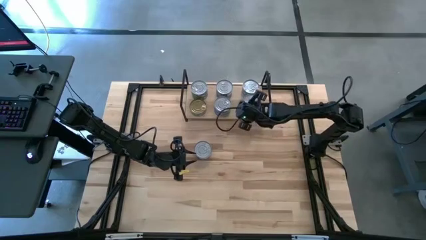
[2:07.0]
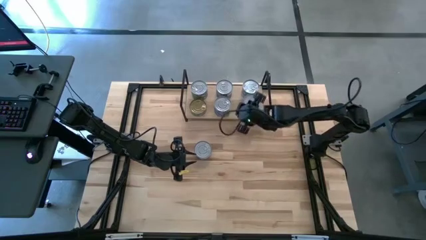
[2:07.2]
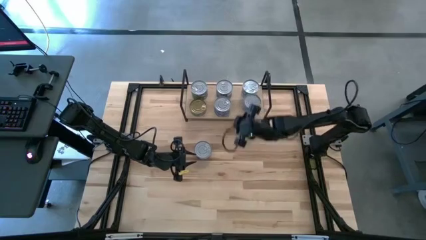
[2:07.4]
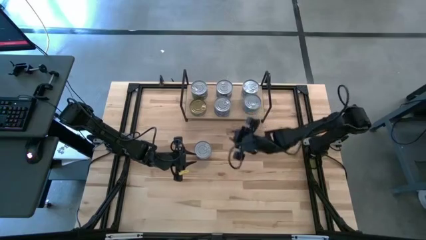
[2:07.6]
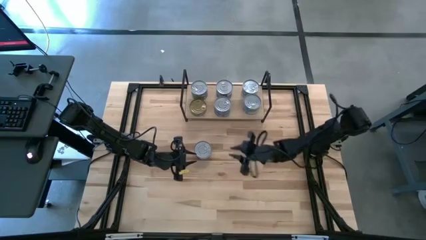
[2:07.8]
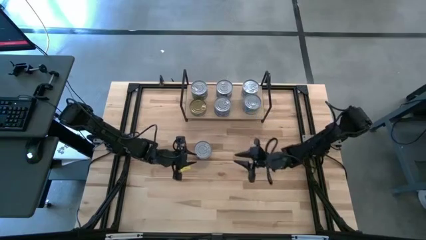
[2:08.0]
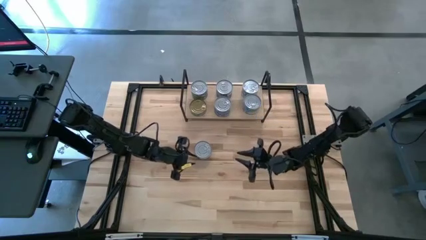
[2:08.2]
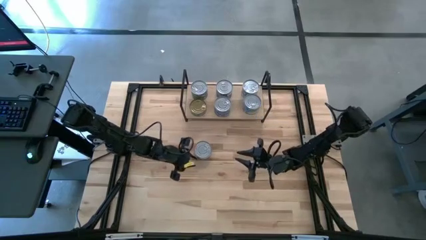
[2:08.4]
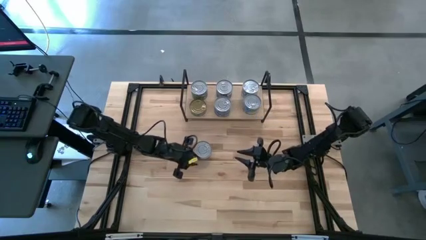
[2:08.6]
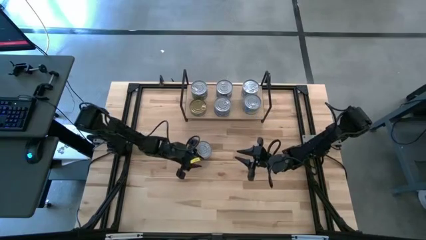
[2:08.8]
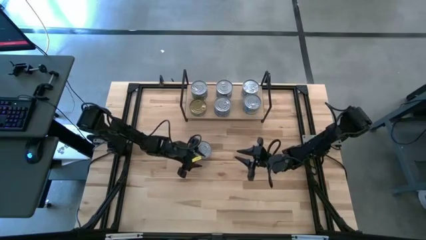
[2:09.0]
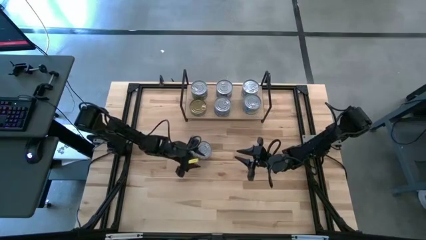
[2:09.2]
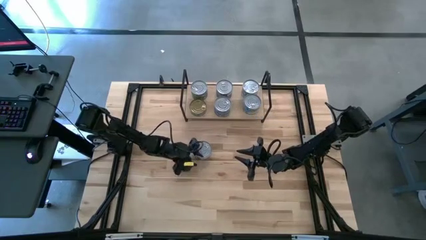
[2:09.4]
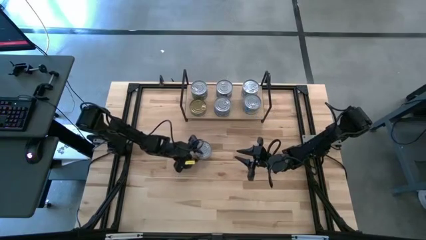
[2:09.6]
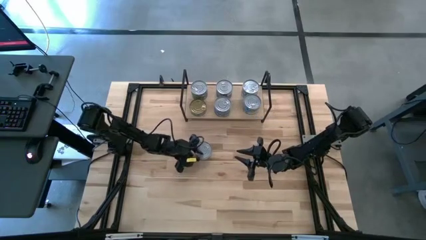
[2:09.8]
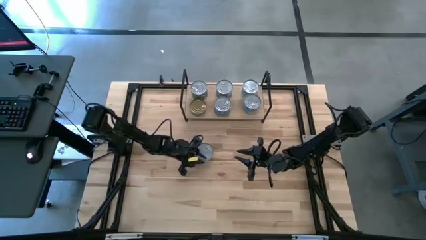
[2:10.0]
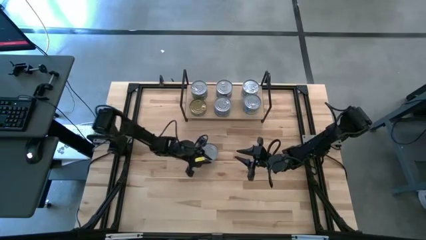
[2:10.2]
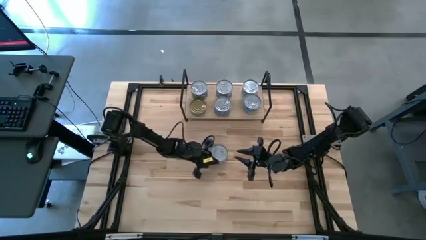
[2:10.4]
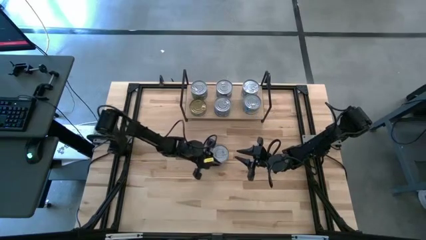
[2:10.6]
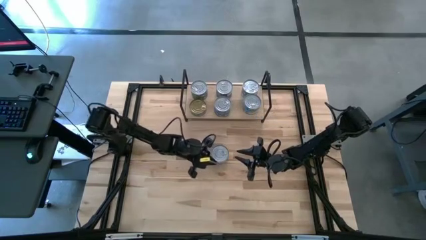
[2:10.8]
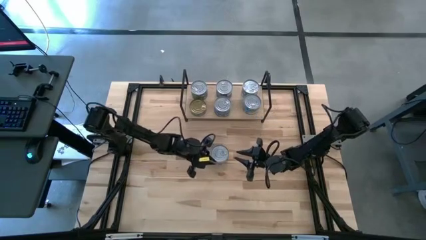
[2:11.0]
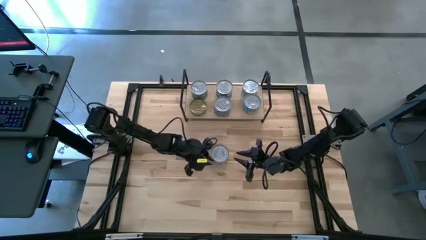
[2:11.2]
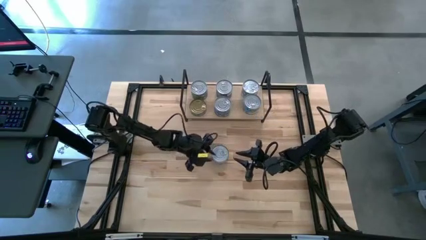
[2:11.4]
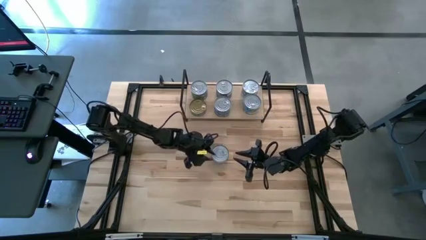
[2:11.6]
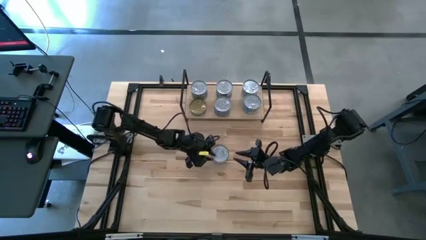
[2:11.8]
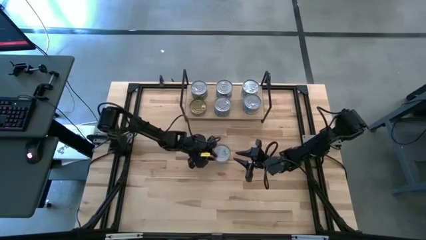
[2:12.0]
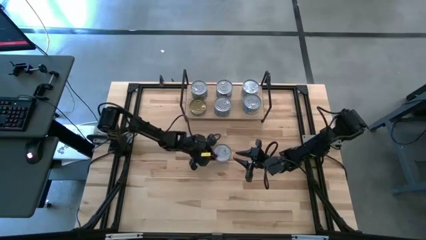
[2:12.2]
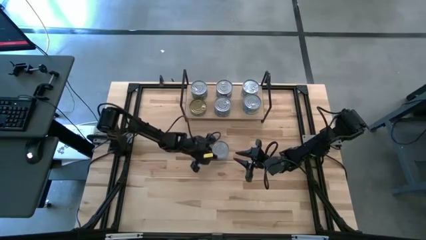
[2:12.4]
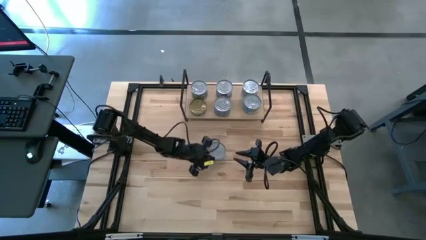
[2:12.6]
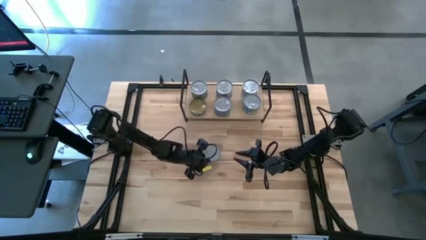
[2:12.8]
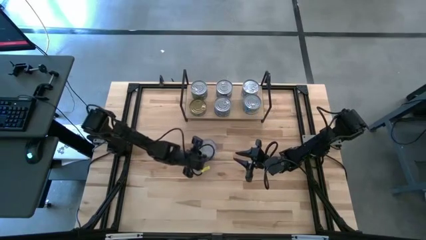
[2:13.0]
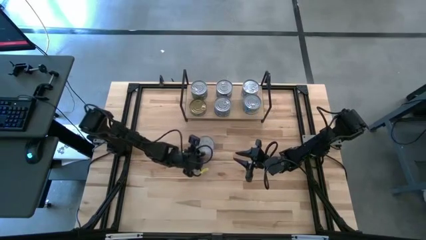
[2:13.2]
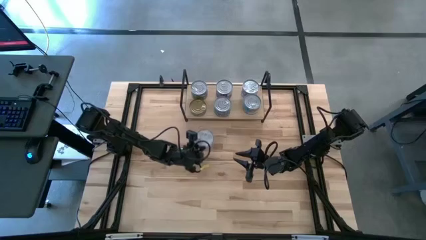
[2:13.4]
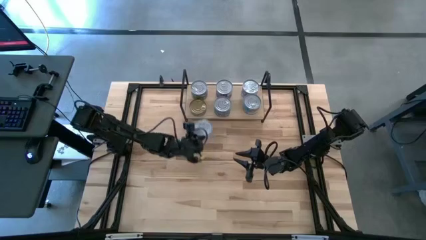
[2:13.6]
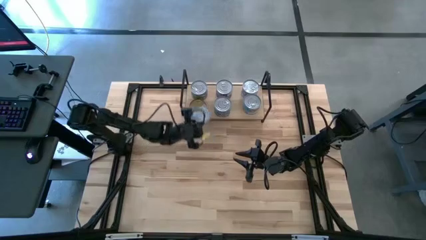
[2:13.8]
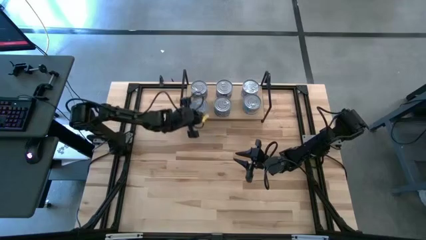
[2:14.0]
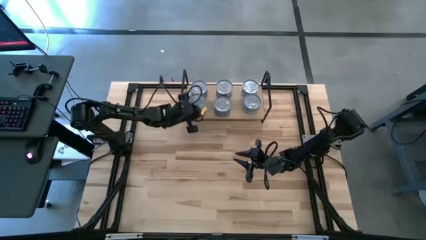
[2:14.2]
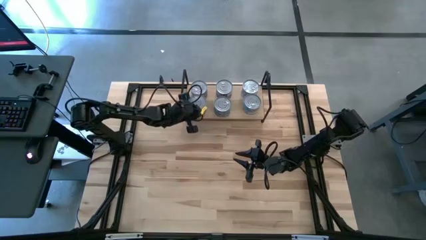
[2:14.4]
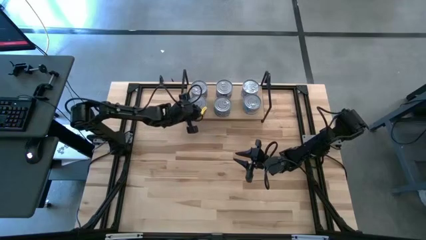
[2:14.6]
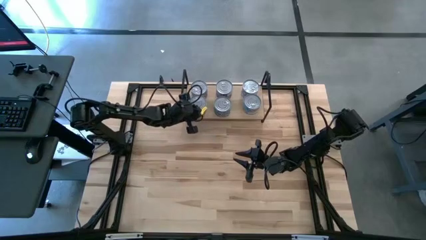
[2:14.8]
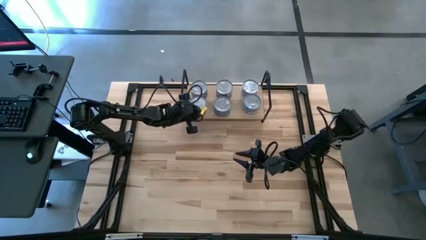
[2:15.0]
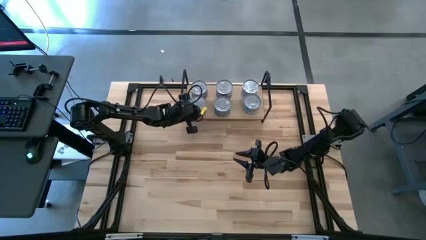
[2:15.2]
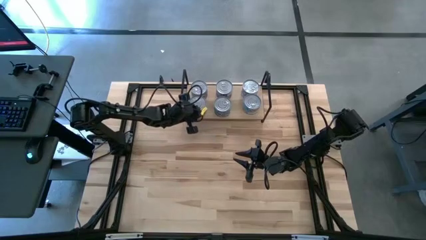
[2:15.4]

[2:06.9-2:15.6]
Task: Stack canned seafood by type on shelf
Stack the green tuna can on top of the green tuna can on the shelf

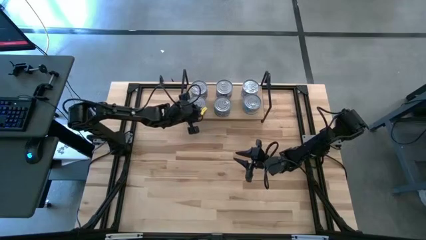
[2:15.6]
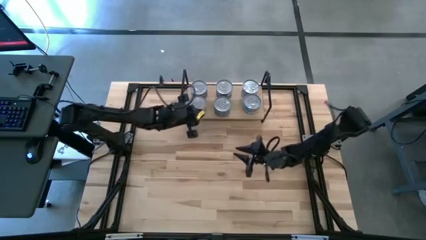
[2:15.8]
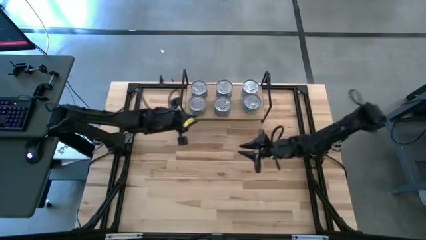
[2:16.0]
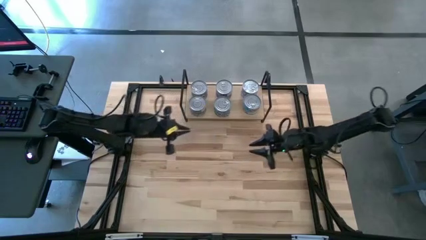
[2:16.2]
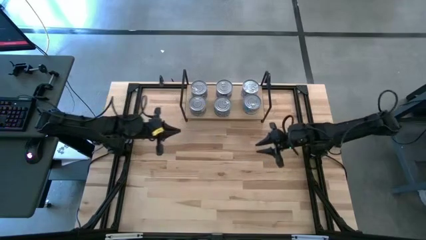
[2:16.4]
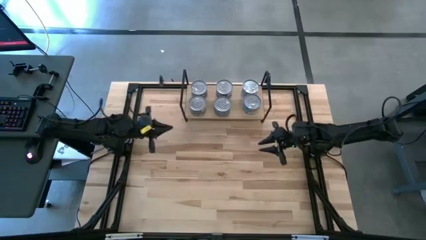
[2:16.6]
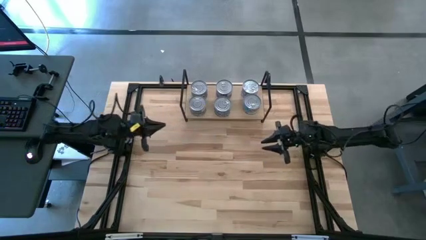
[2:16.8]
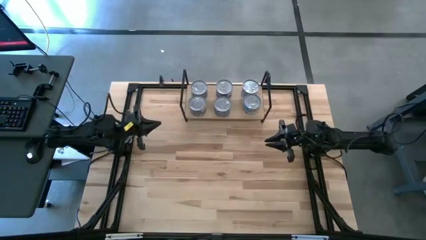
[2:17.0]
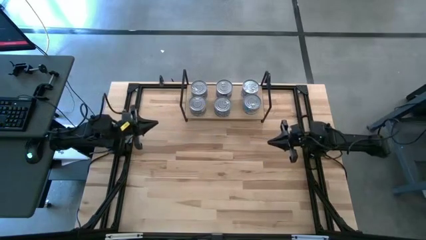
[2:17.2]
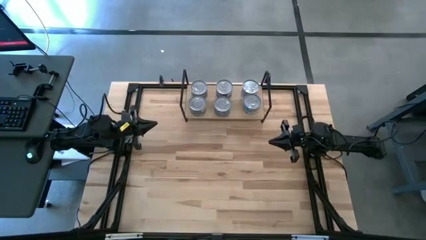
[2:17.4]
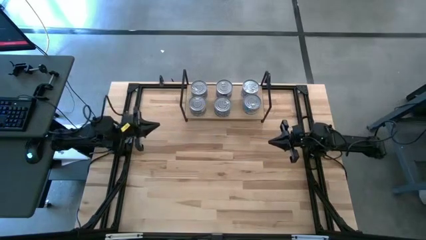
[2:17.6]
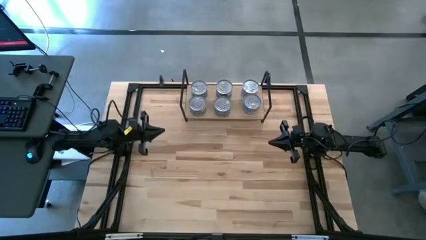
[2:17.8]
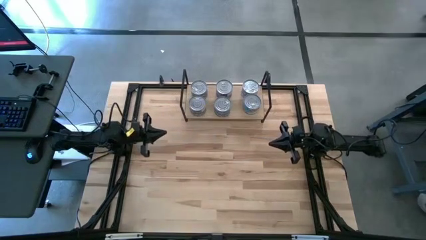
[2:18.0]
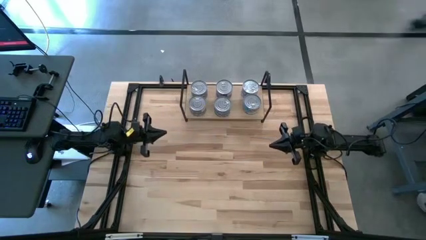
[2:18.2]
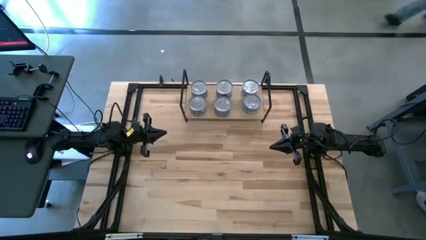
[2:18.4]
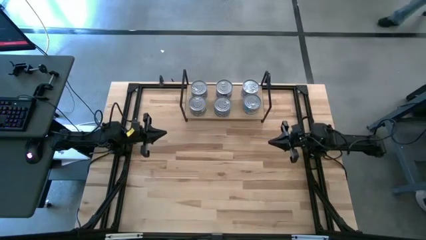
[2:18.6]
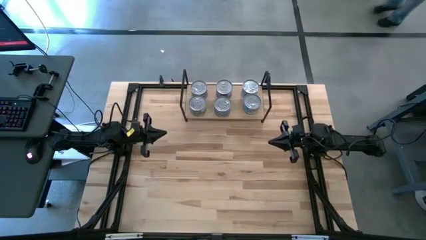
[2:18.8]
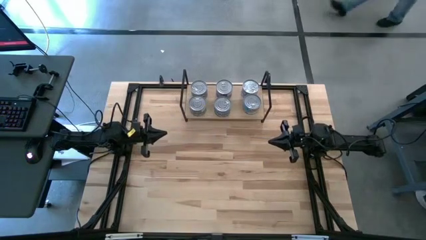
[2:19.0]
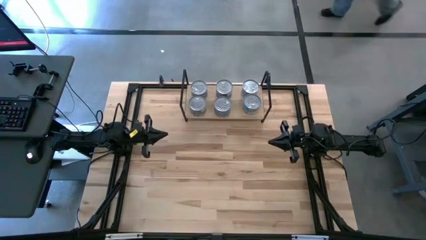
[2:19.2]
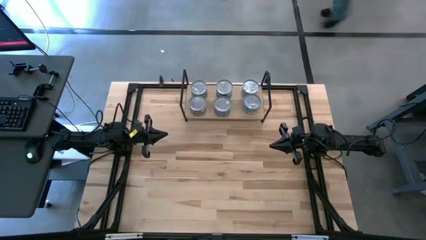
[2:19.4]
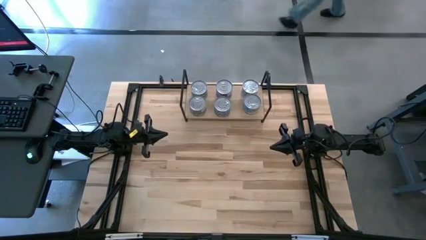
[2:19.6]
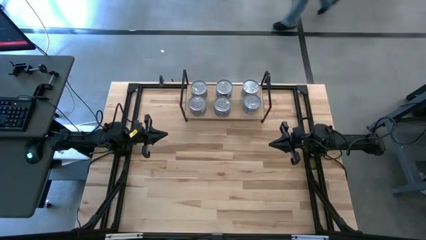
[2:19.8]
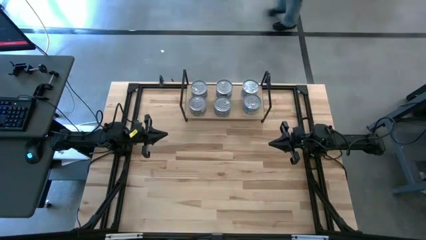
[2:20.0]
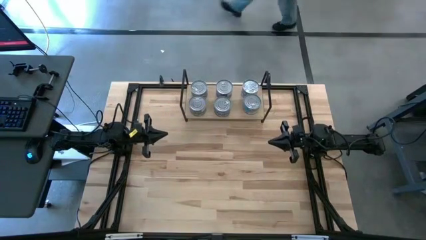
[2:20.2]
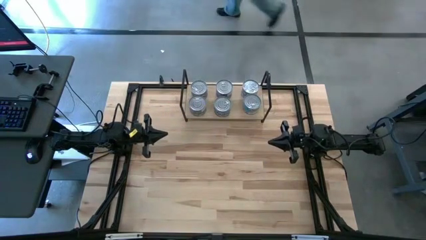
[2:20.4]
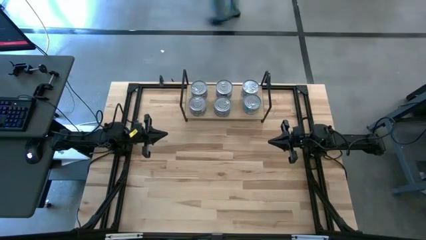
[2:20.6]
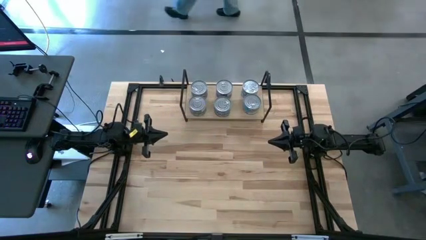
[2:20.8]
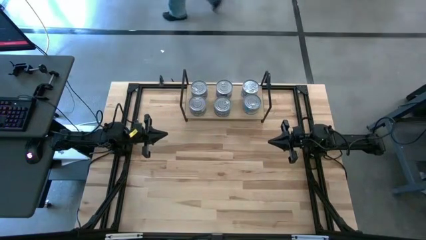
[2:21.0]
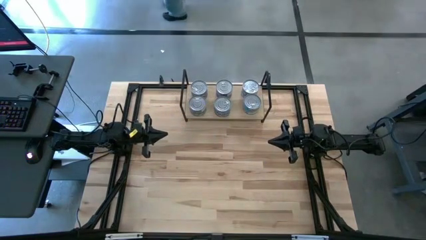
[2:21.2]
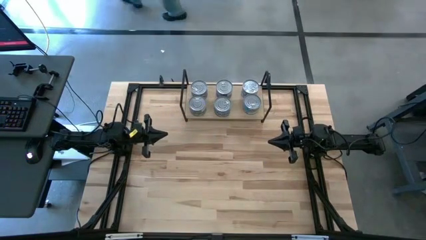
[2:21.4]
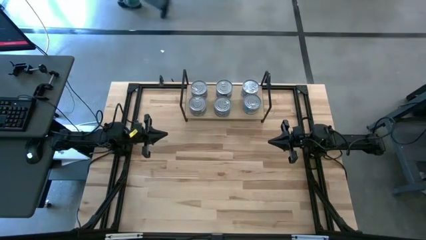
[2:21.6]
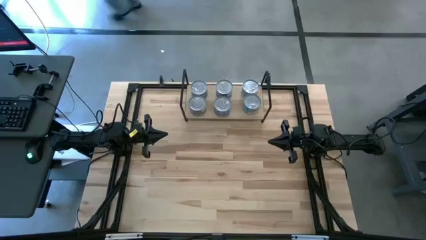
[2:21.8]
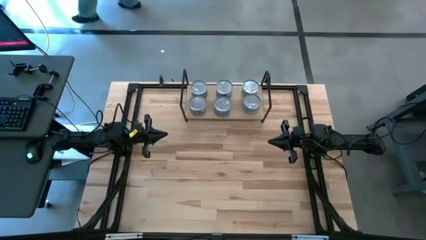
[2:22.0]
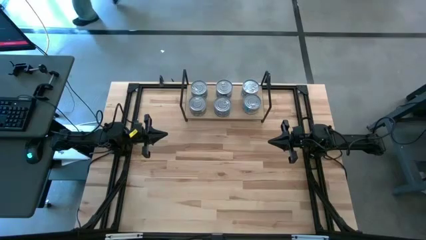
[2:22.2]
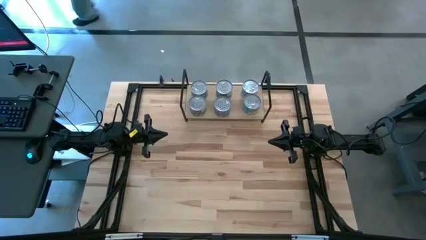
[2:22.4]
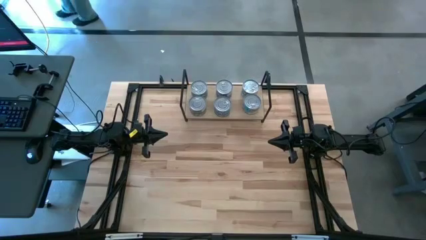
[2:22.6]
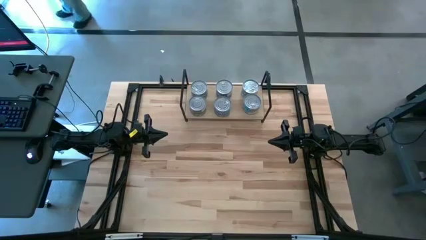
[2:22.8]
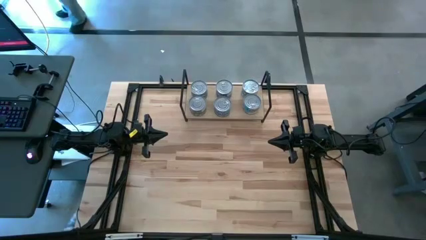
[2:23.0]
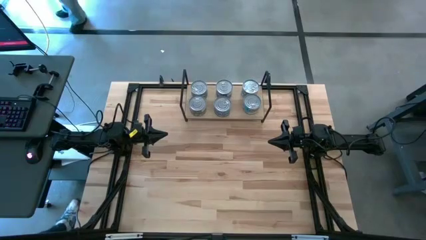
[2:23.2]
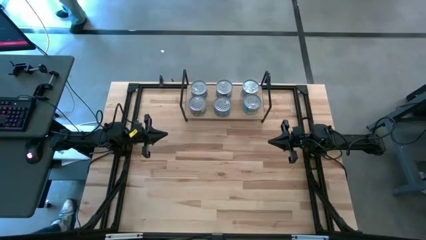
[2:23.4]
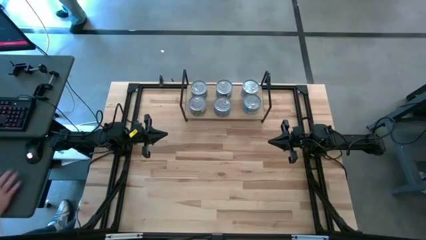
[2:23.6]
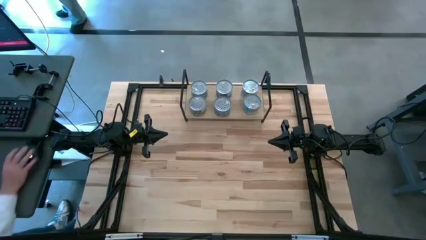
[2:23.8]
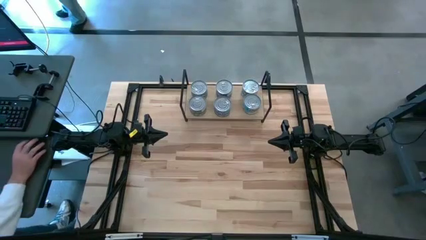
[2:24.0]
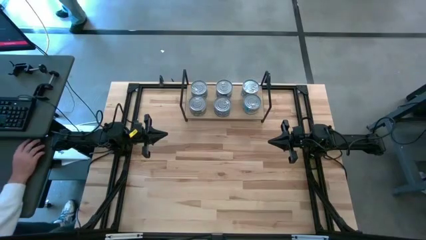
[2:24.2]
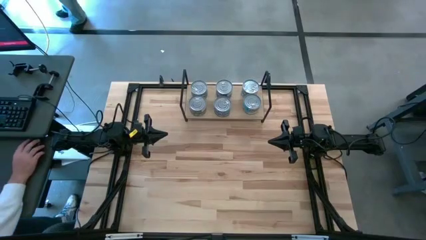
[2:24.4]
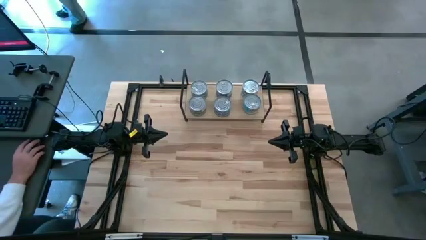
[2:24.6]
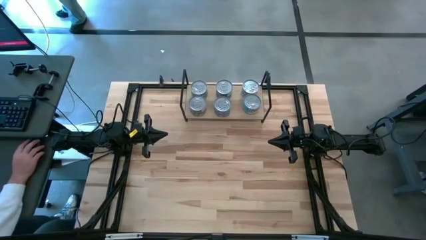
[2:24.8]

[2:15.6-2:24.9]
Return to Home Position
